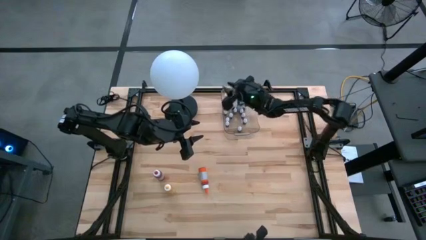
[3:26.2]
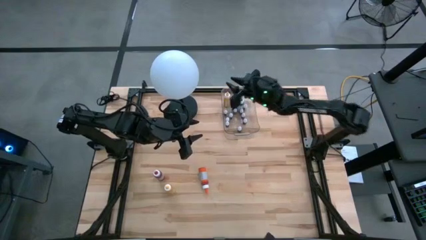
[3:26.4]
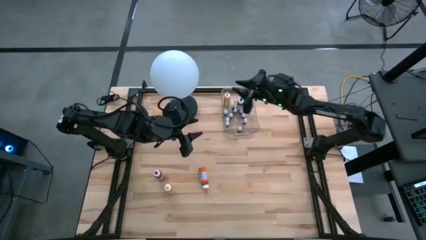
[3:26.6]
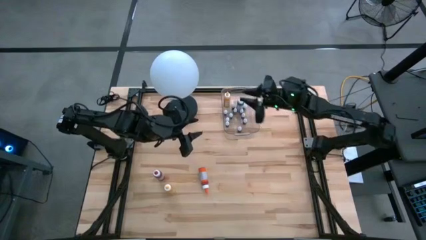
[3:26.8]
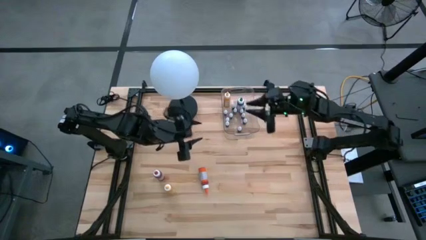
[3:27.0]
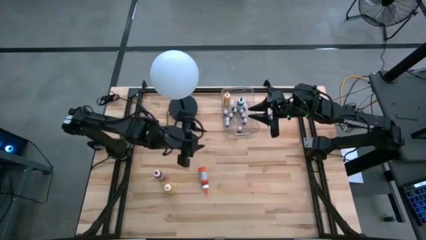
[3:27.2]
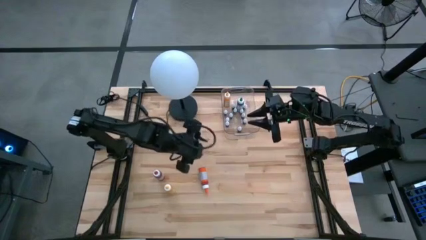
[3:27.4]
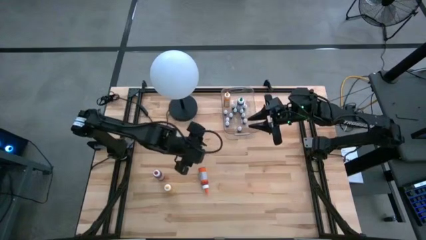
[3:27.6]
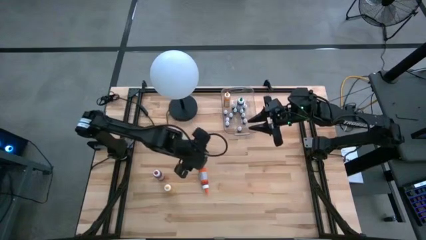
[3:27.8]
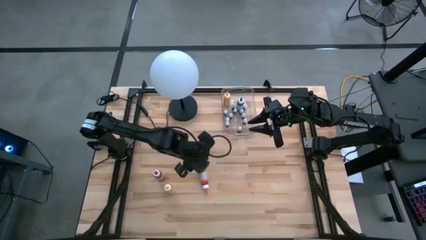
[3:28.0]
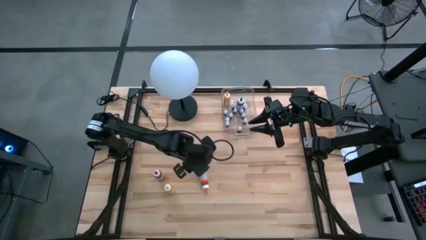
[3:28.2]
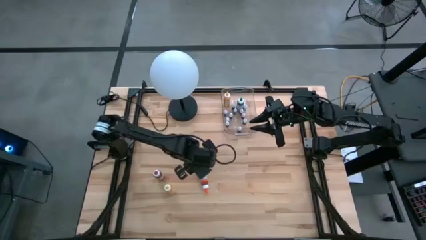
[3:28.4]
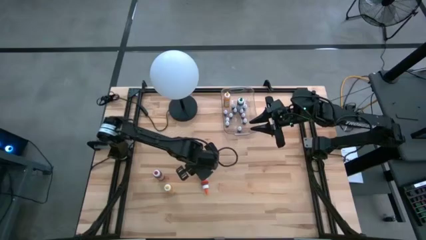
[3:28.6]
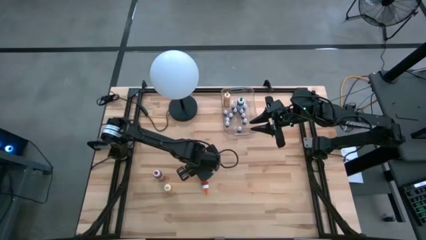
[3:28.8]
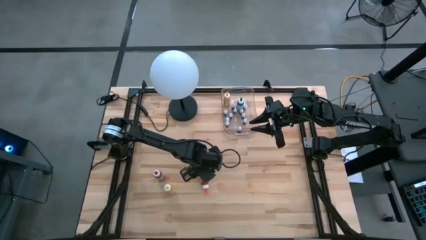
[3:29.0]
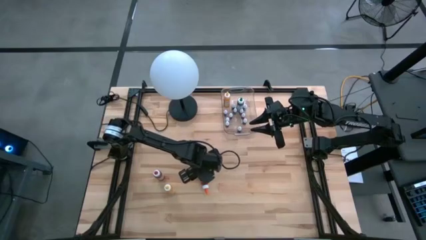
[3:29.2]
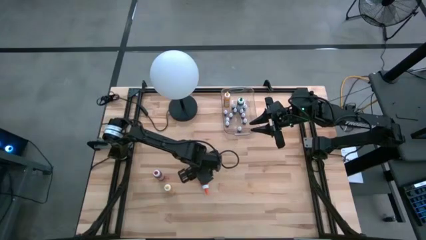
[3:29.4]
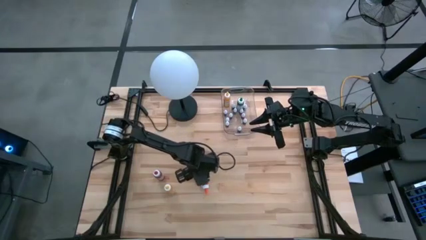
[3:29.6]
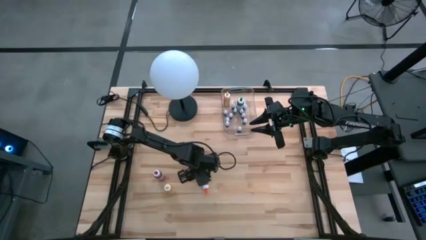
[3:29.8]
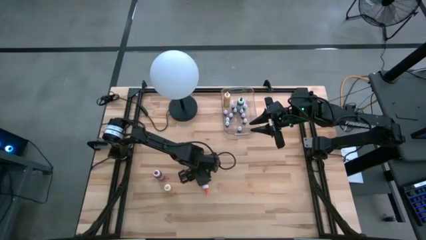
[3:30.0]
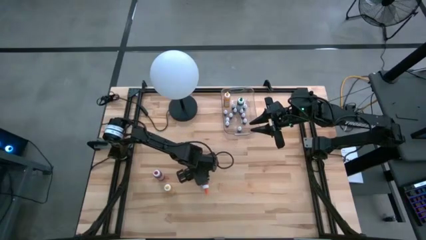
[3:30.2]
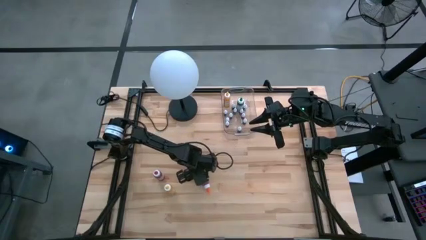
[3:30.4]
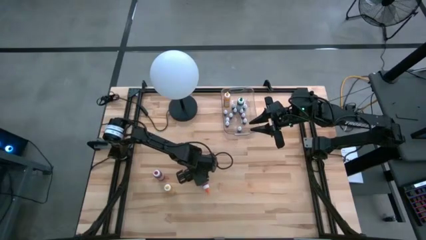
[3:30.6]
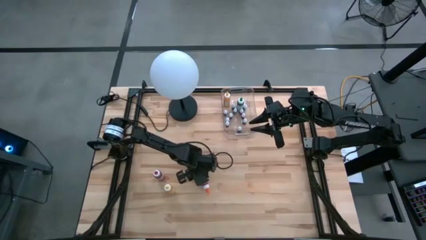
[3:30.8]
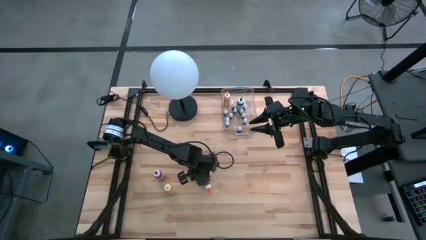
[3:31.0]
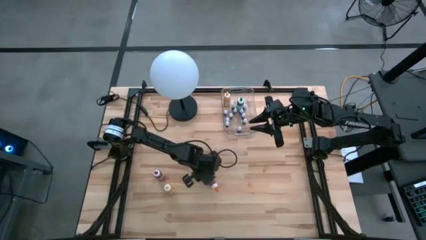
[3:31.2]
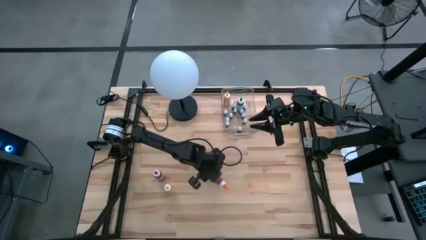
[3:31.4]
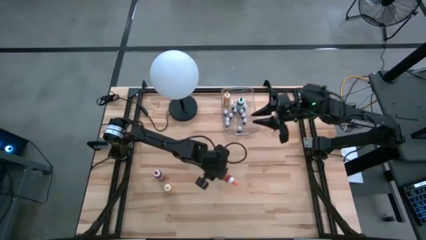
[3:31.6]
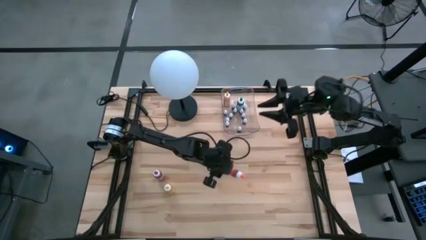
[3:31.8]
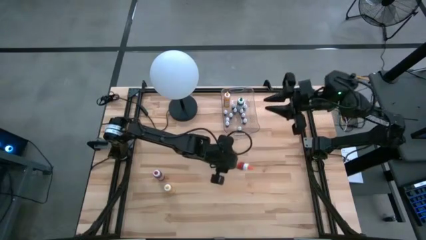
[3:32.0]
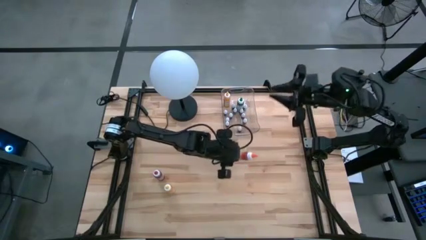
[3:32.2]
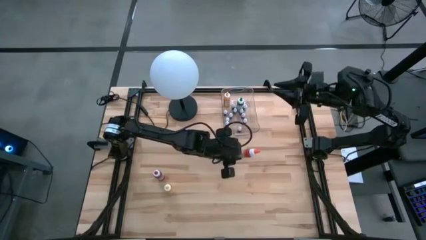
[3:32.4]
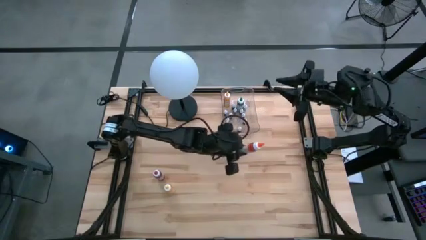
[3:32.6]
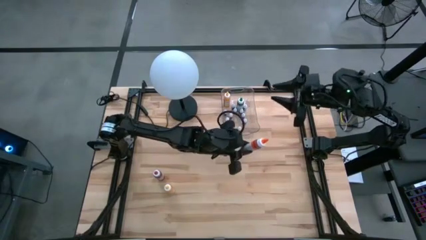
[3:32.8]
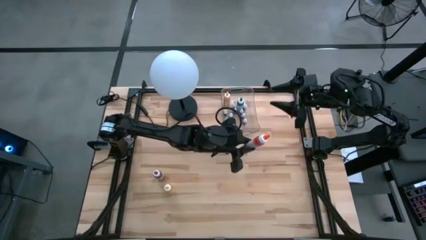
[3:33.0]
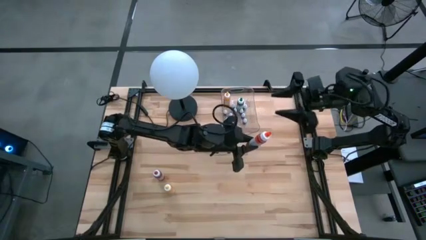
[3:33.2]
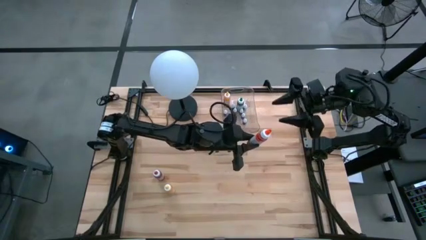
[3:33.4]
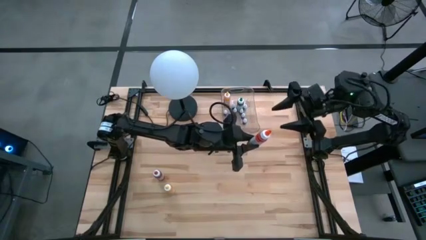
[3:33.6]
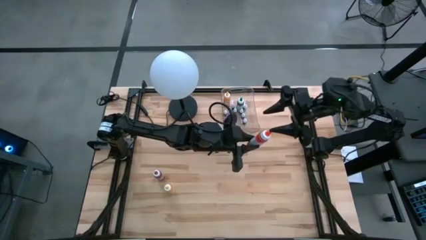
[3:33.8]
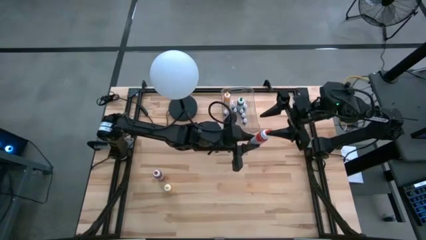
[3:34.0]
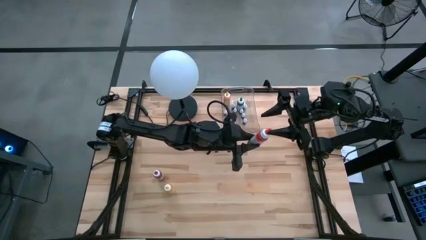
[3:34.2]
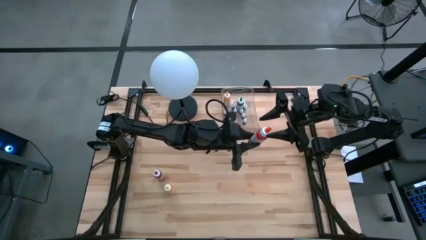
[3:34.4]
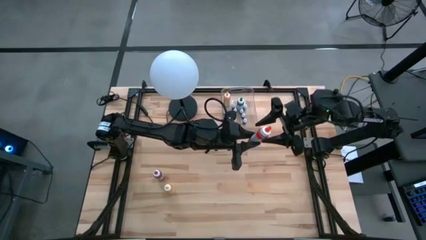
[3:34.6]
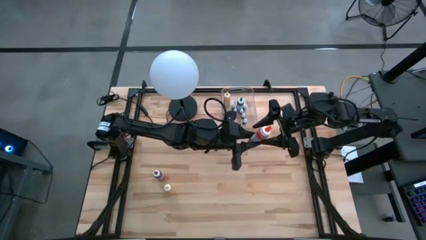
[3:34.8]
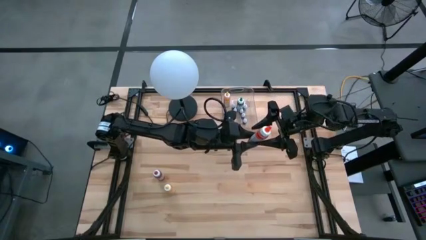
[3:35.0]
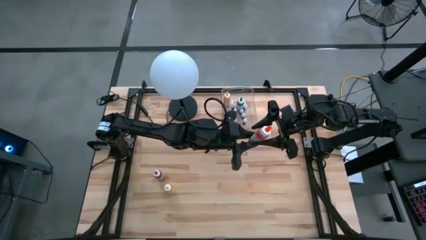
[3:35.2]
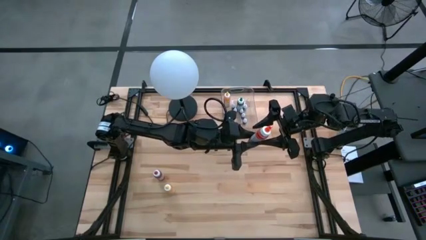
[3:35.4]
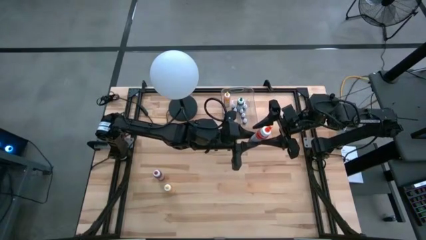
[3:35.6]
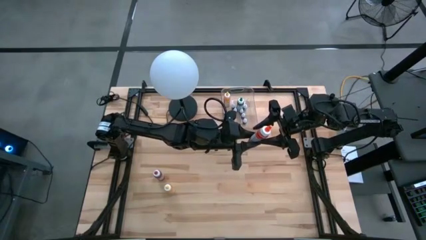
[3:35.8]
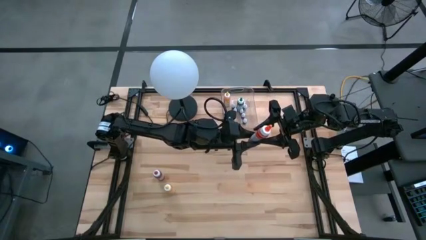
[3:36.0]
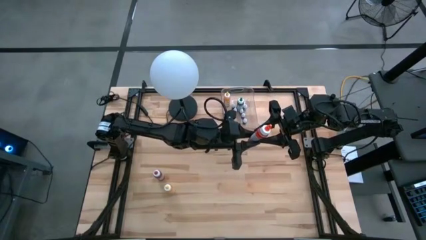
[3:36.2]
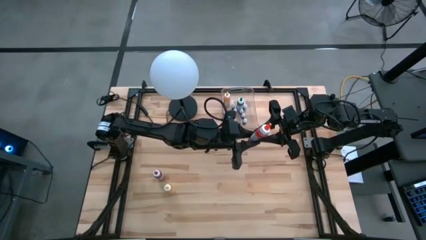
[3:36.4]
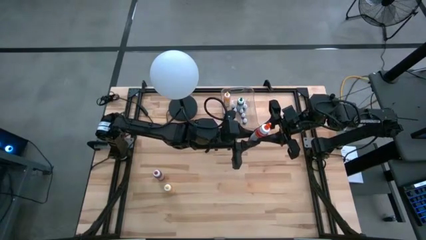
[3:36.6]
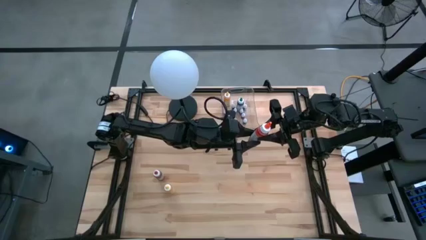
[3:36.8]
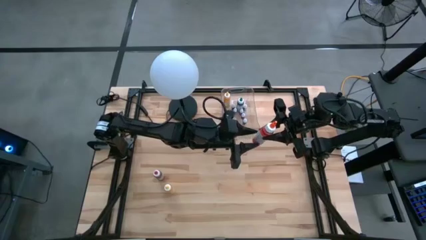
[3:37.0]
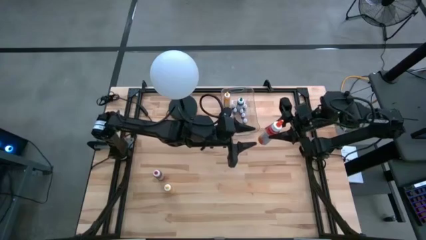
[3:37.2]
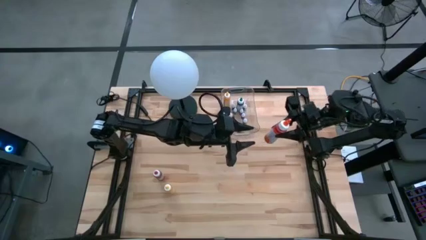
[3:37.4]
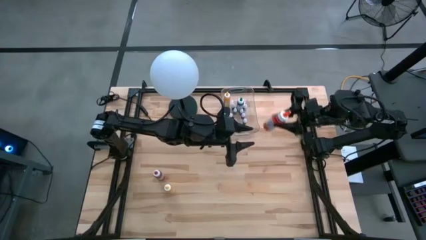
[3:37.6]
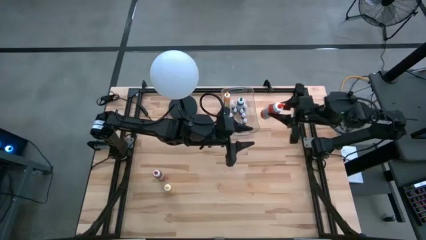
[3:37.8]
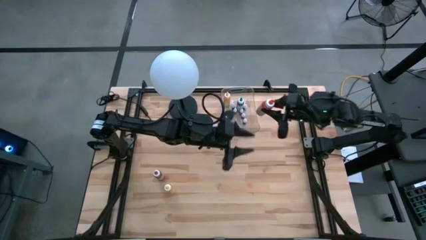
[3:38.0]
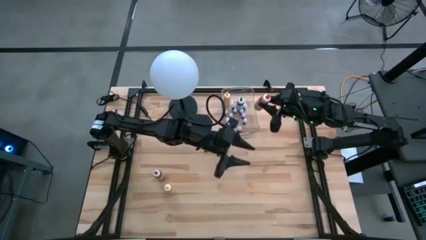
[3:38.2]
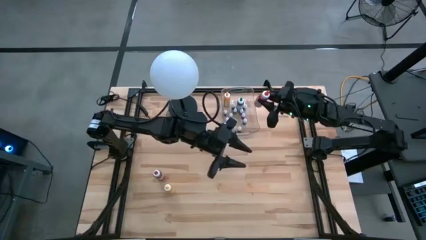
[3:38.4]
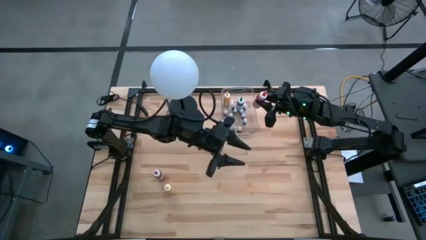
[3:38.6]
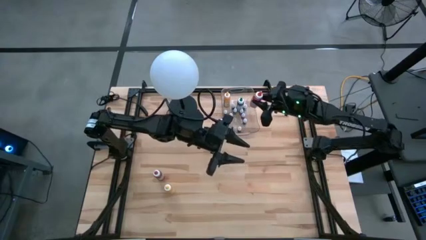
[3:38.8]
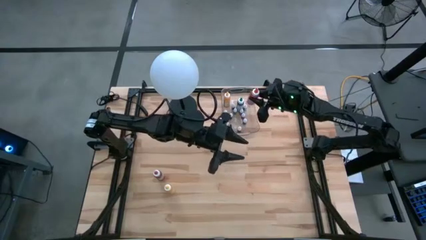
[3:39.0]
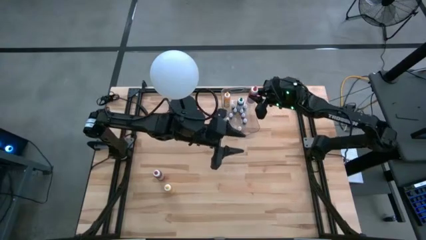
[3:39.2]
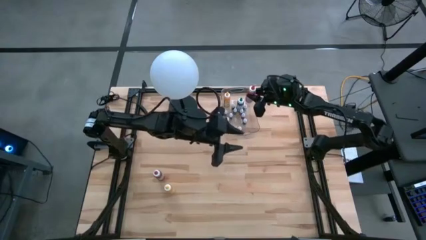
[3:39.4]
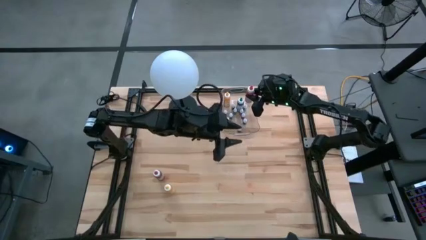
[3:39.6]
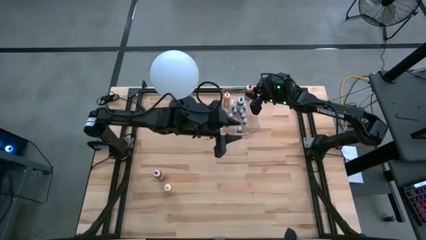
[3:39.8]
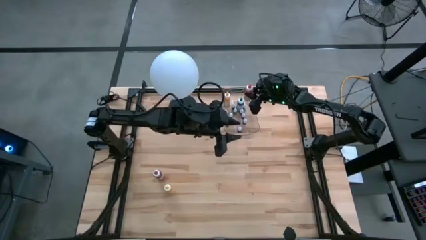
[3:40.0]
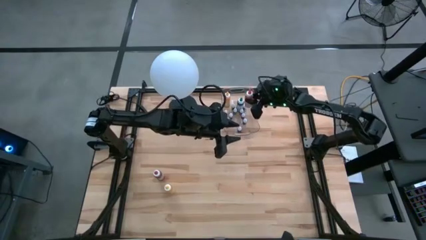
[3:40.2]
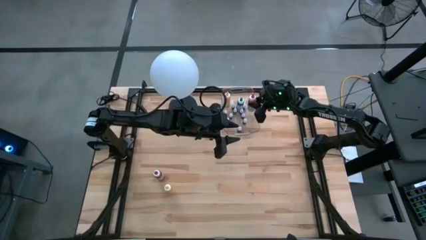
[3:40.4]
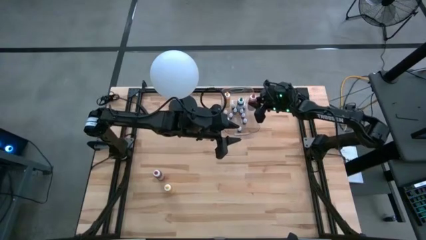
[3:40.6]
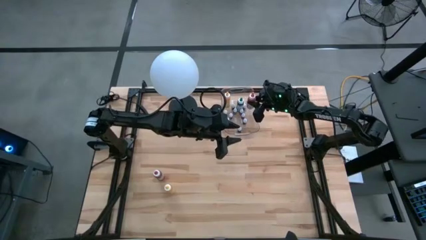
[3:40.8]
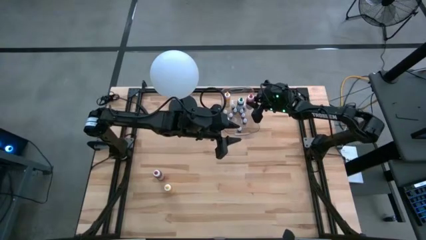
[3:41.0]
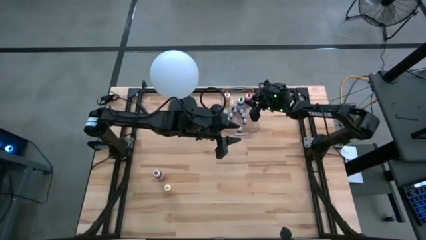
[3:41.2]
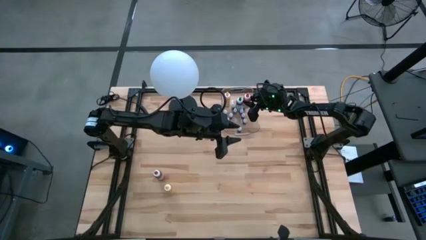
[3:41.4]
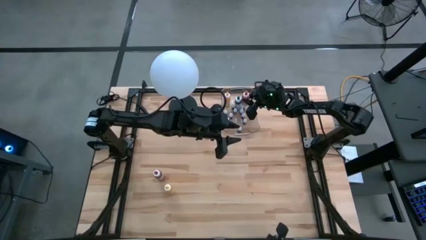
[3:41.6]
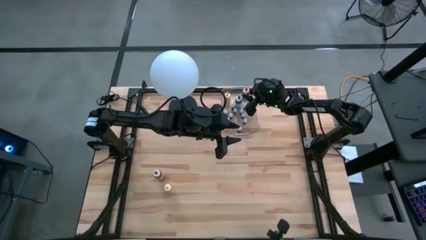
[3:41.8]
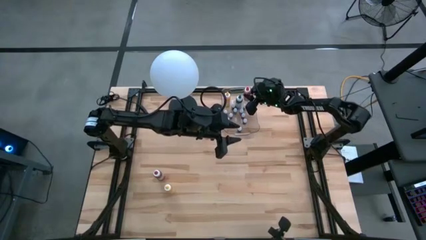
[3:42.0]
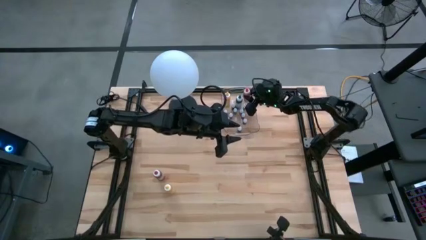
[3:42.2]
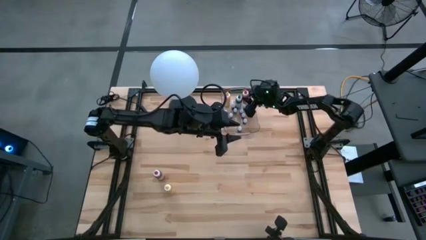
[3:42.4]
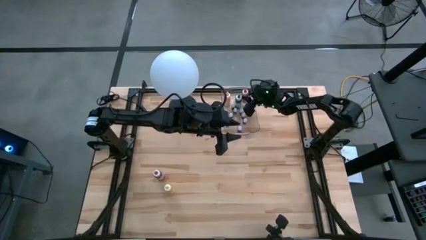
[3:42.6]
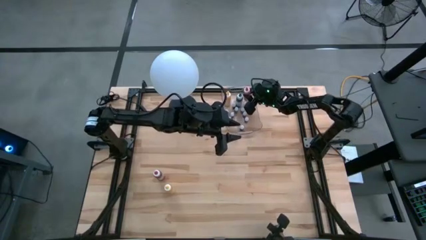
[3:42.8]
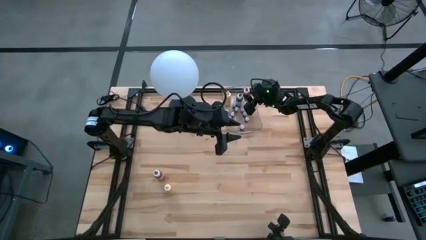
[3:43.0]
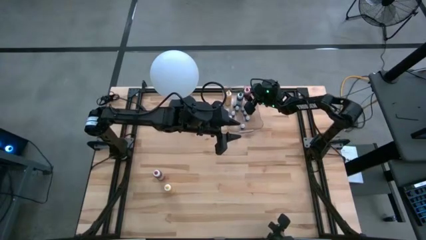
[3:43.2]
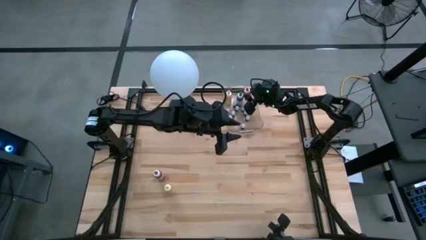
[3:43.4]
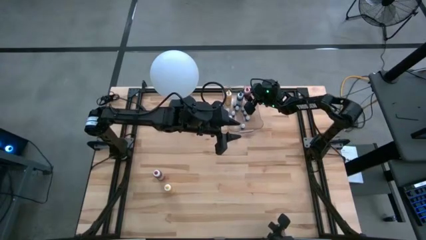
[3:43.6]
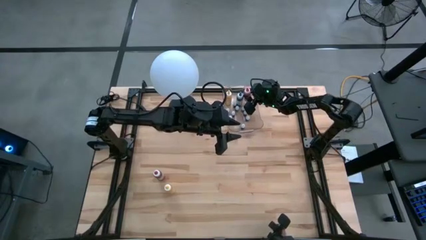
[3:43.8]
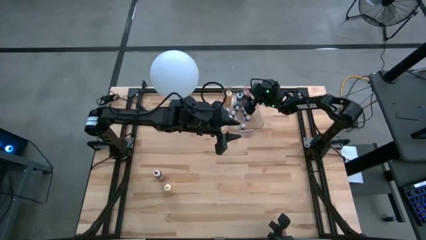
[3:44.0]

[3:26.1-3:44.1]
Task: Pick & Place food coloring
Put the large orange food coloring bottle into the transparent bin
